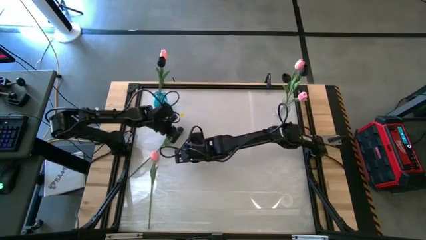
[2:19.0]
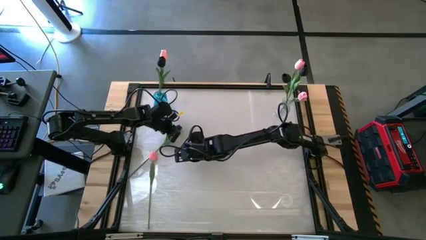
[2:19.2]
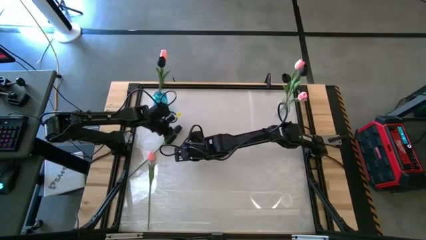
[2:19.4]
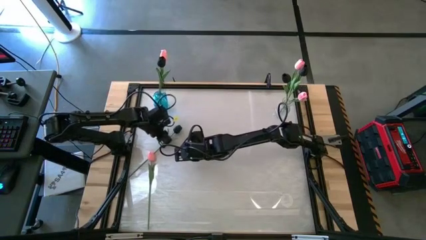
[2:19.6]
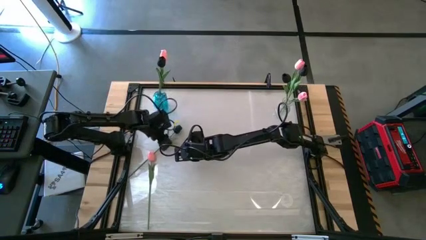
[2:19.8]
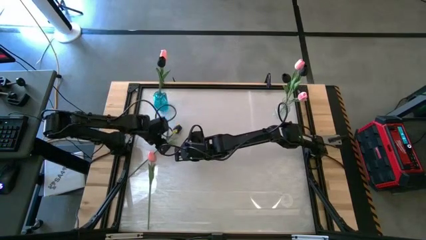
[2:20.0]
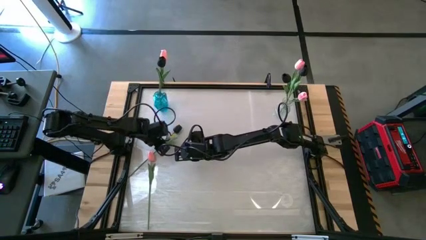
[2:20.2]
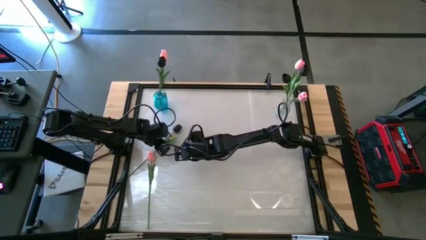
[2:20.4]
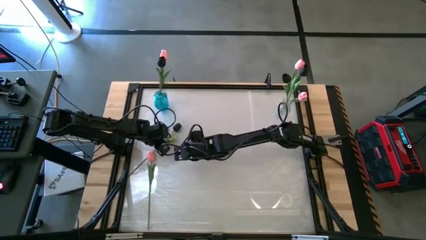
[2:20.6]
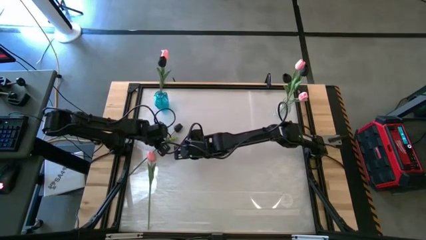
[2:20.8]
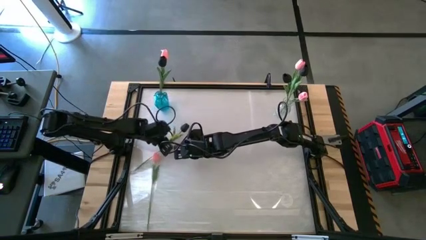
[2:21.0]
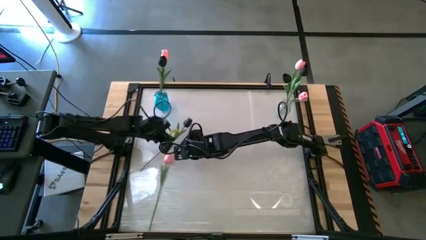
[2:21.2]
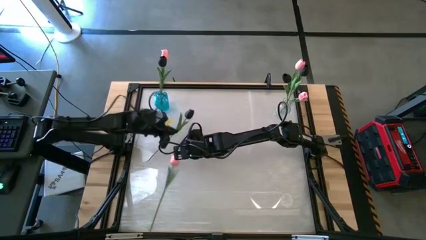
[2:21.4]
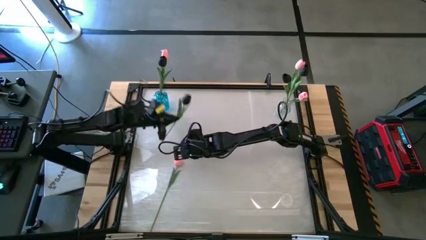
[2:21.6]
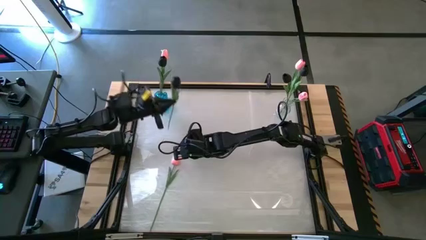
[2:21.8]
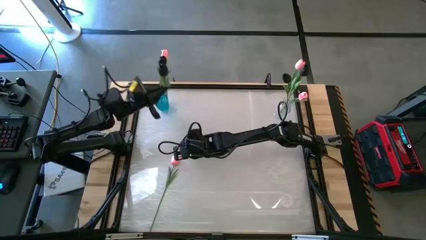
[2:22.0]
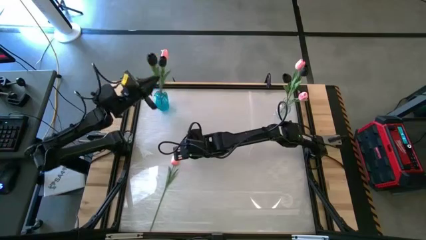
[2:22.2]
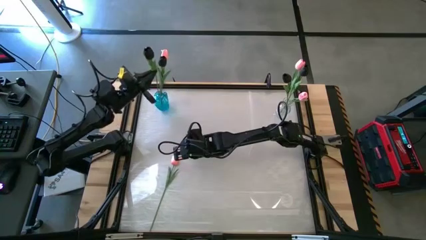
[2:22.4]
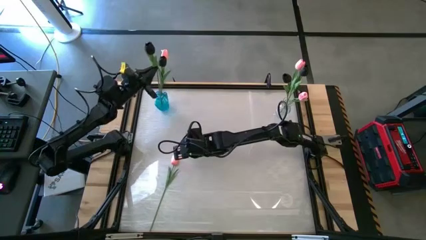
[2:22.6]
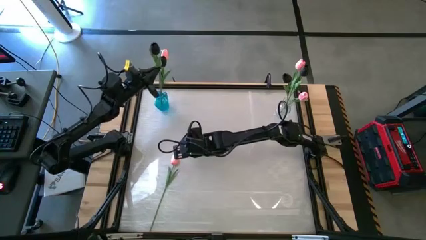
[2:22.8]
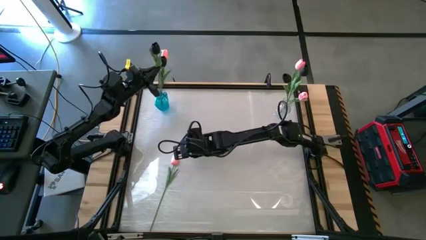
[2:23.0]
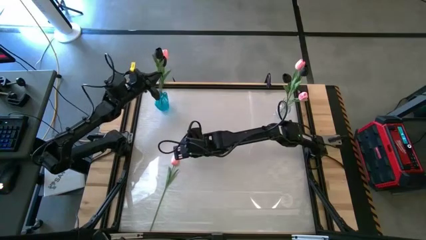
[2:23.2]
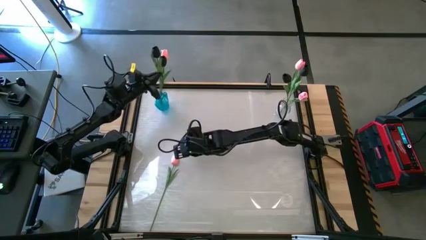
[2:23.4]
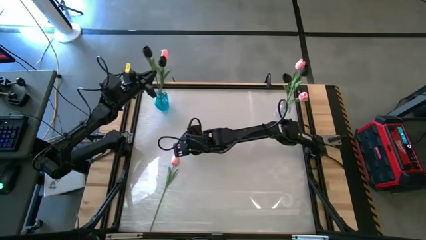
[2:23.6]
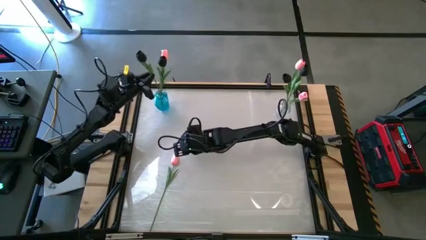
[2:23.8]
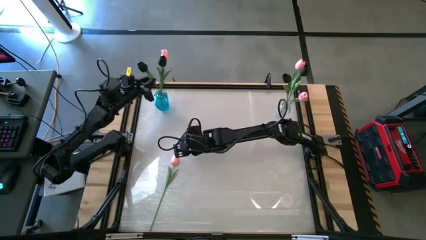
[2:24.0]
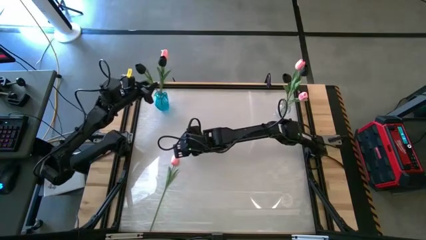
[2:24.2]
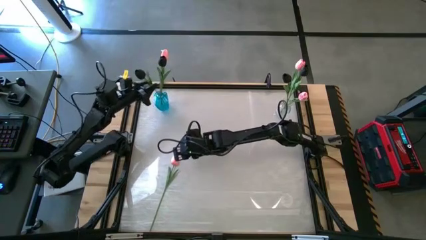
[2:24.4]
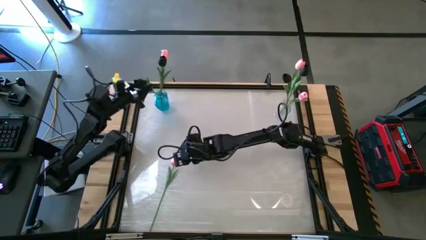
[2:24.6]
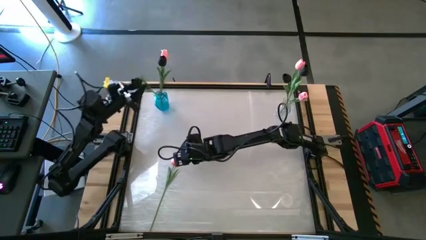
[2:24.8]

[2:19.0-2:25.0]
Task: Sort flowers into vase by color
Put the black flower into the blue vase

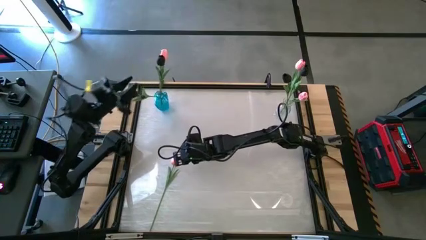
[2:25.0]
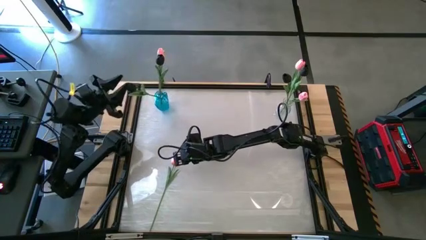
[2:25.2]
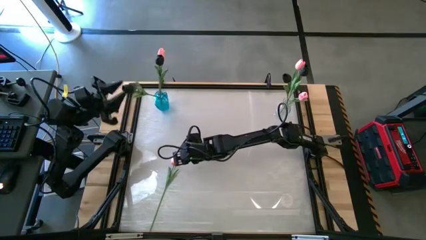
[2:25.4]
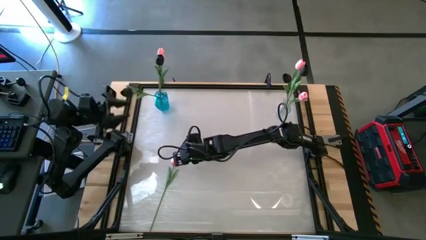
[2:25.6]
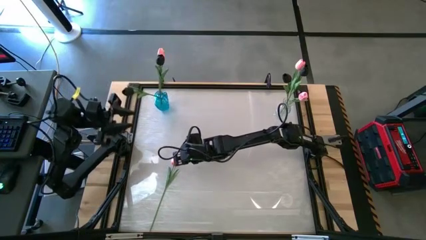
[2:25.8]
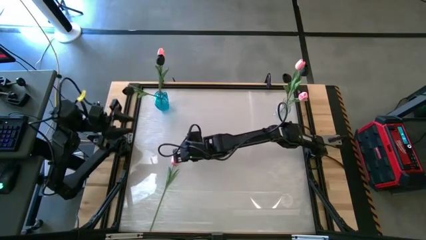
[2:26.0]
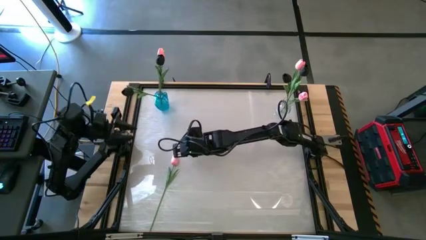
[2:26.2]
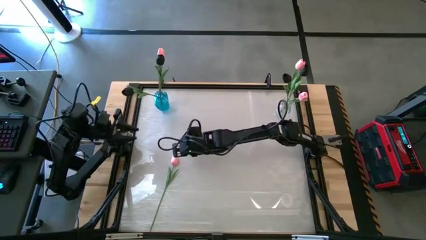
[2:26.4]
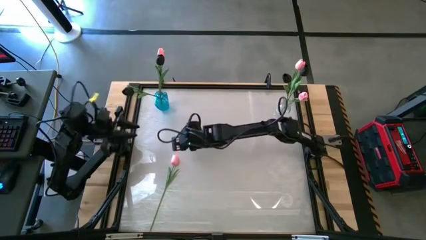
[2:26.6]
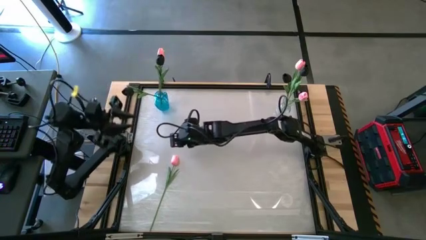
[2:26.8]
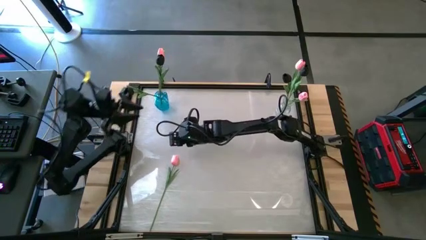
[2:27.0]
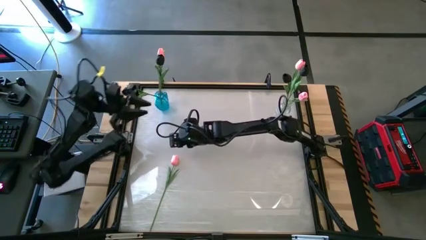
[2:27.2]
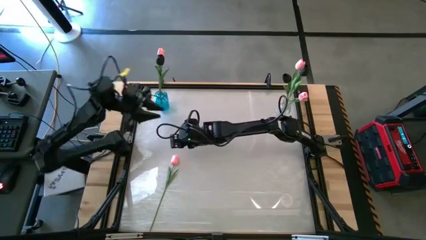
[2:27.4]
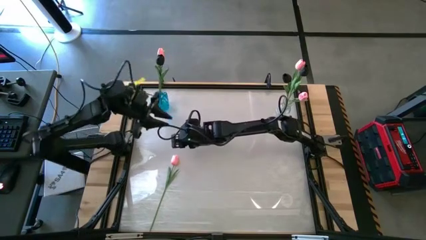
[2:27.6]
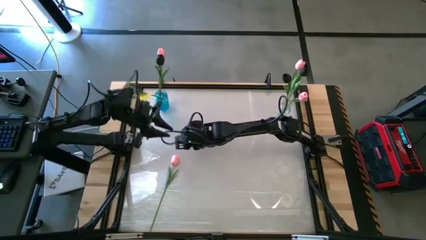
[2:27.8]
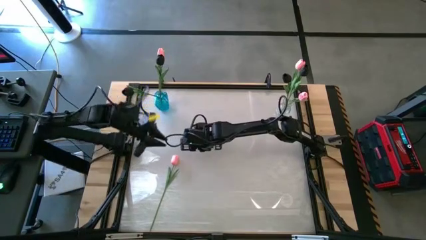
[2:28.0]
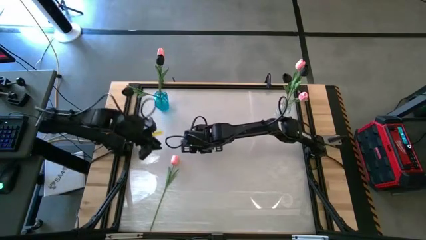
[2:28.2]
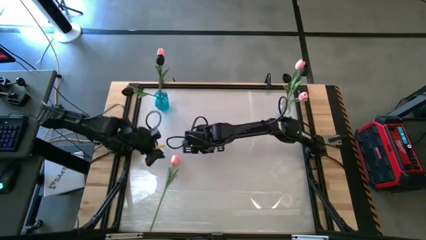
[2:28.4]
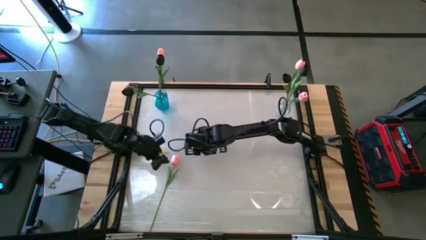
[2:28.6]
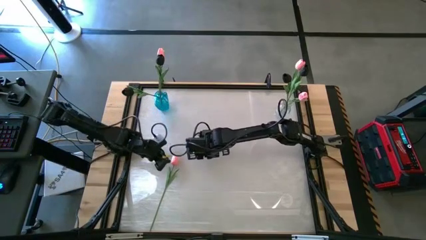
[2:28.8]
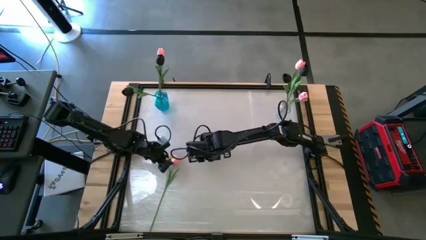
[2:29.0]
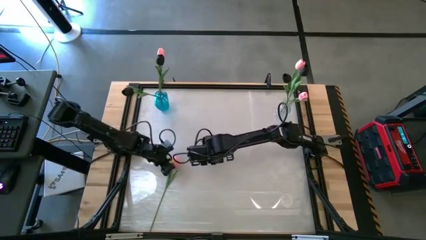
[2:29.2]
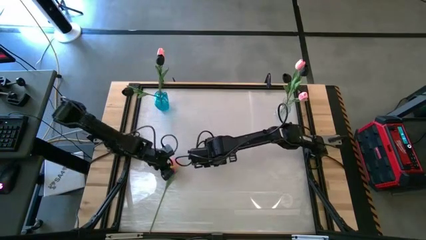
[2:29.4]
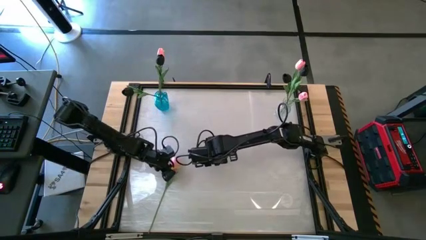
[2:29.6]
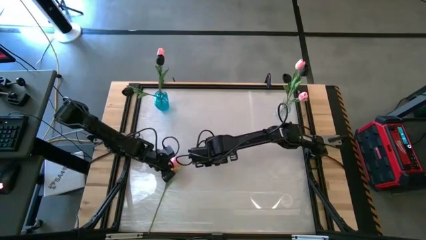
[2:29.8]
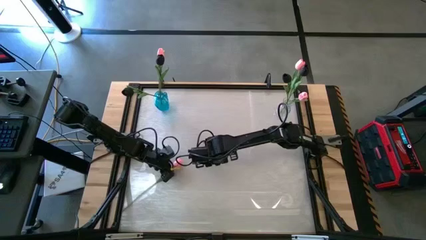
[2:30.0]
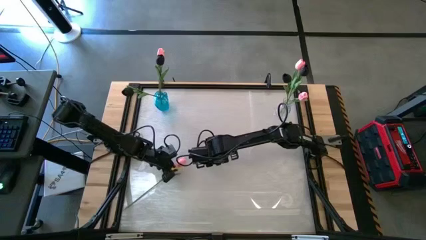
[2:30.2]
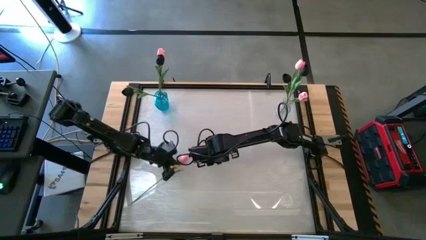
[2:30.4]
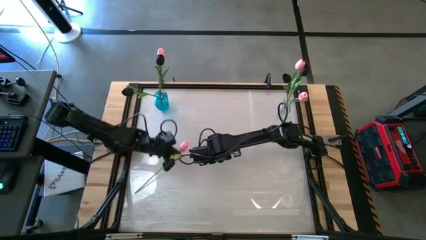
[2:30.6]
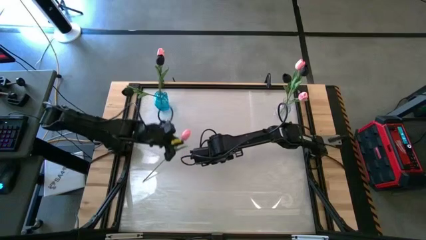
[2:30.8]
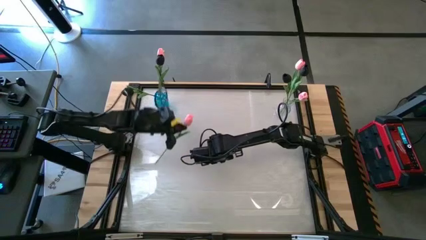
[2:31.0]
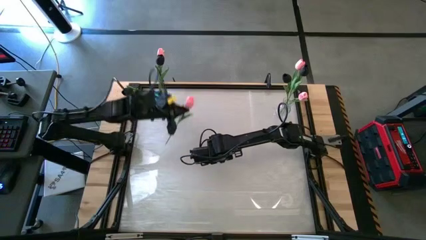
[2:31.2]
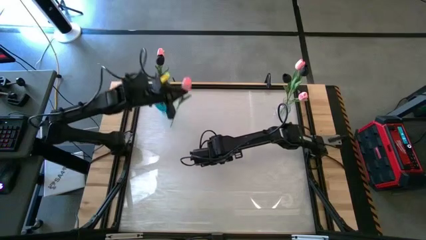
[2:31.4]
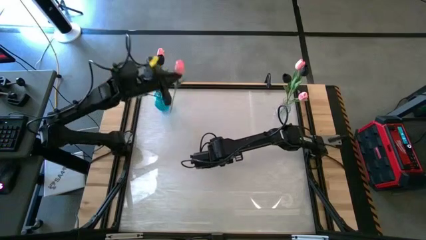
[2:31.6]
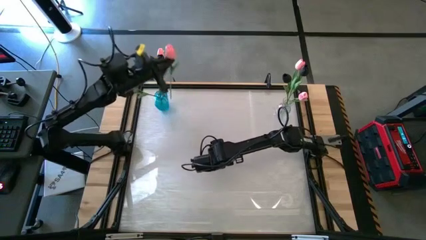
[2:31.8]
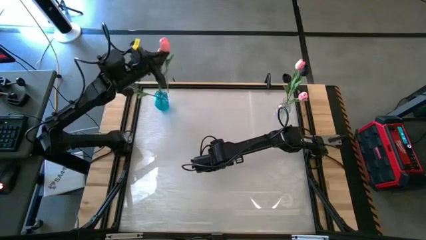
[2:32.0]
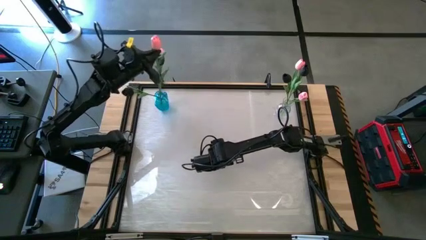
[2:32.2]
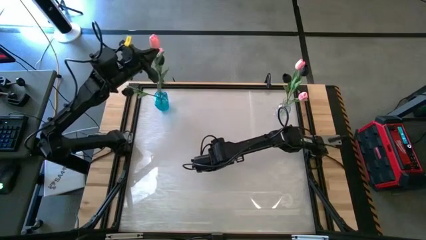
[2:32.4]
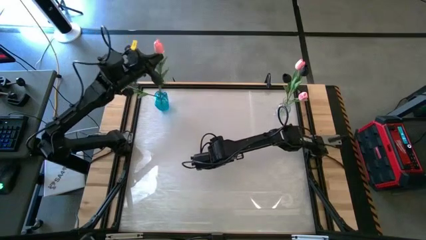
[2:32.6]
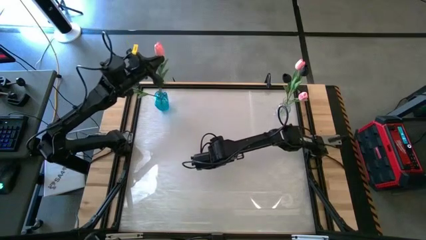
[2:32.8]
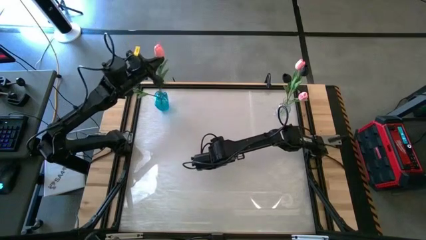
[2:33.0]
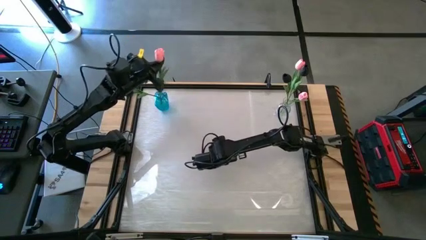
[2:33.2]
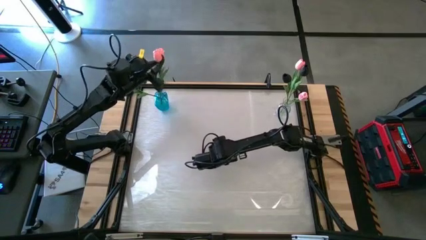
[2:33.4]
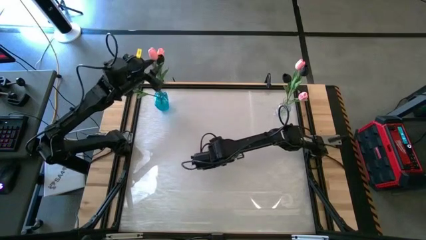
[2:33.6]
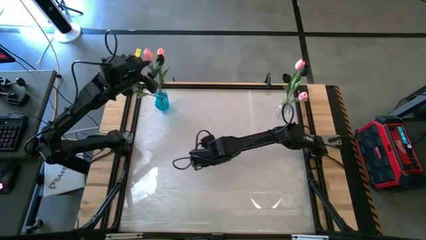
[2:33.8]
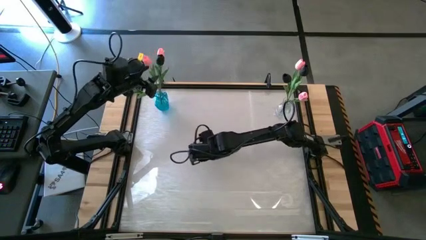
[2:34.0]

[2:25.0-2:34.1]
Put the pink flower into the blue vase
